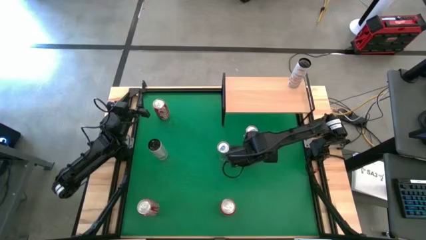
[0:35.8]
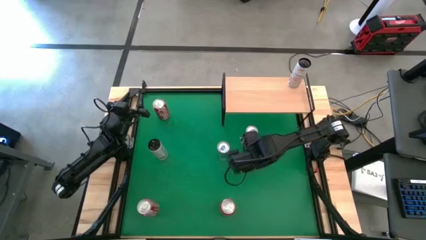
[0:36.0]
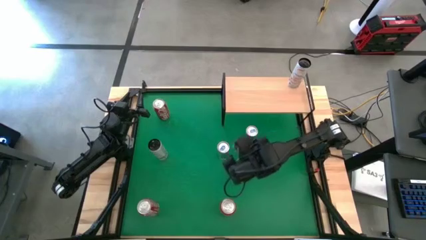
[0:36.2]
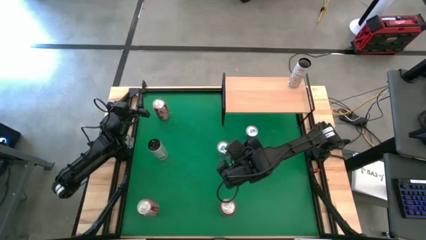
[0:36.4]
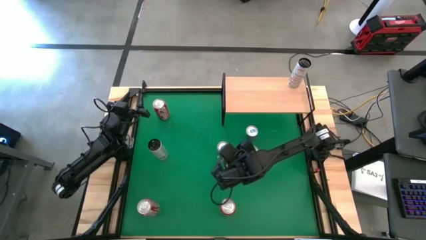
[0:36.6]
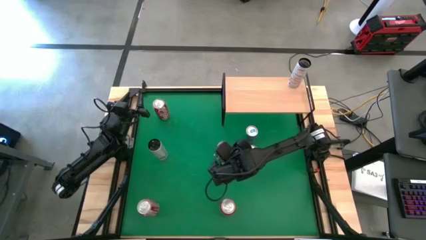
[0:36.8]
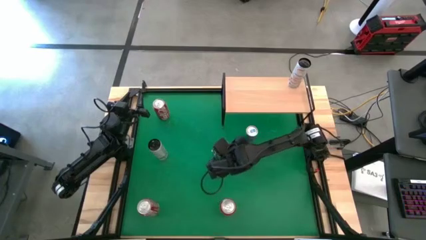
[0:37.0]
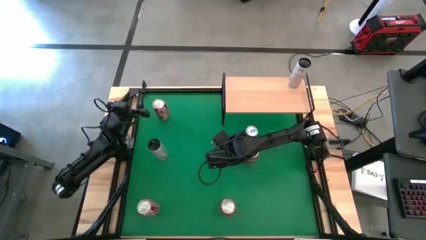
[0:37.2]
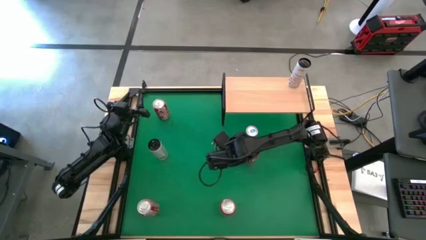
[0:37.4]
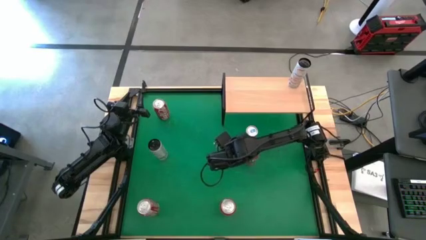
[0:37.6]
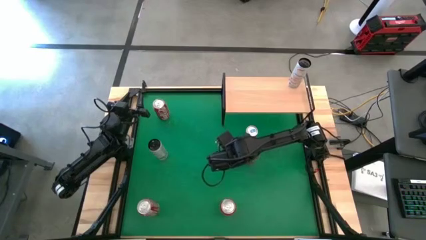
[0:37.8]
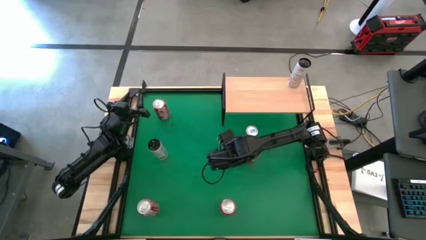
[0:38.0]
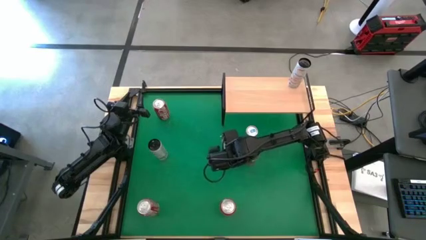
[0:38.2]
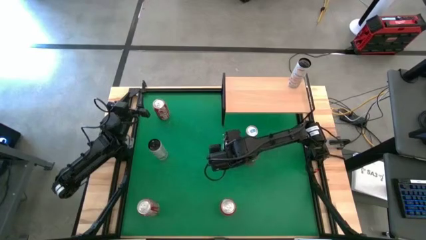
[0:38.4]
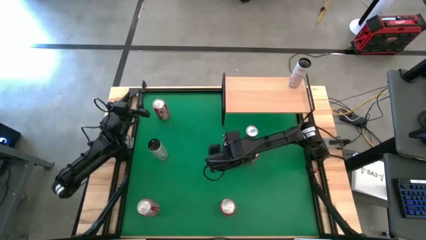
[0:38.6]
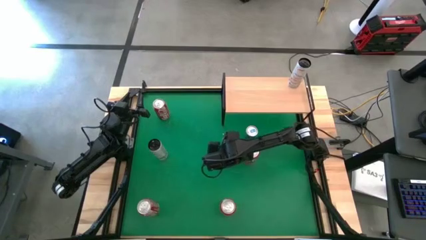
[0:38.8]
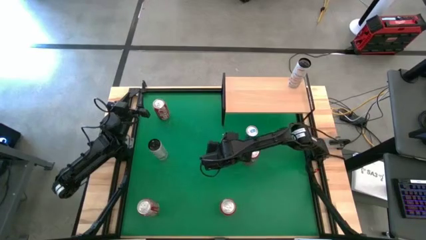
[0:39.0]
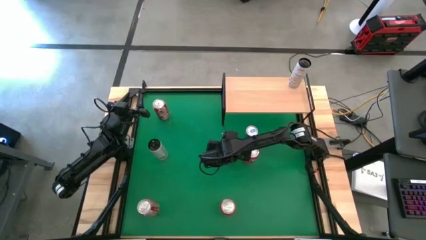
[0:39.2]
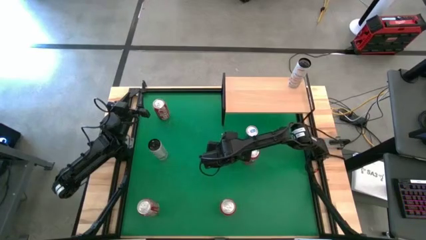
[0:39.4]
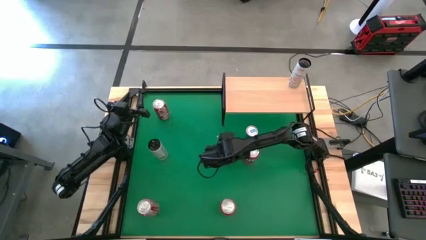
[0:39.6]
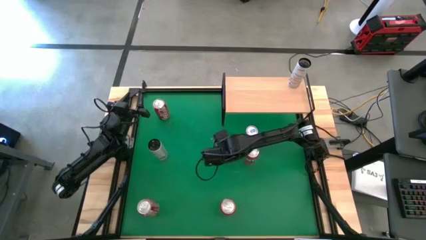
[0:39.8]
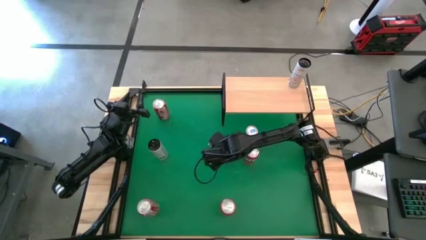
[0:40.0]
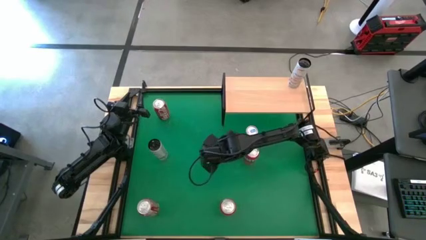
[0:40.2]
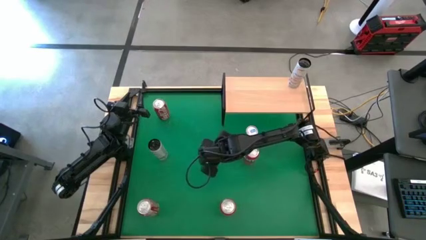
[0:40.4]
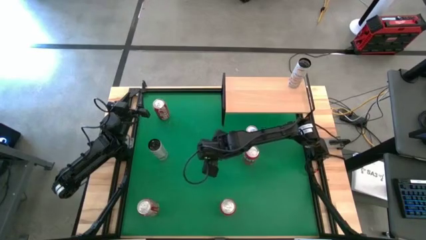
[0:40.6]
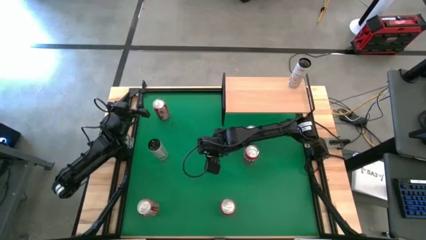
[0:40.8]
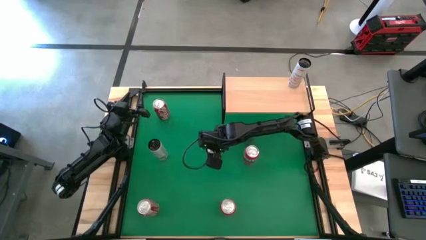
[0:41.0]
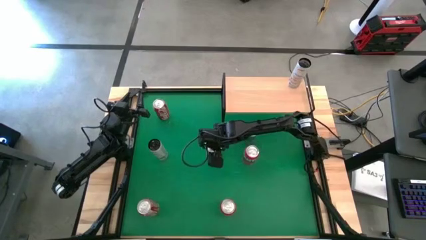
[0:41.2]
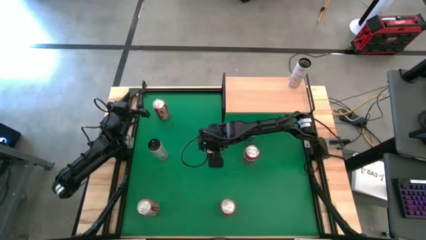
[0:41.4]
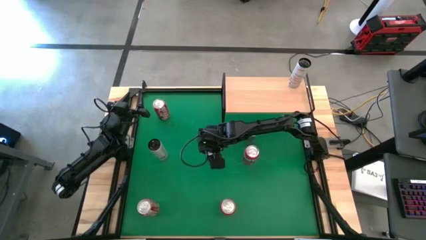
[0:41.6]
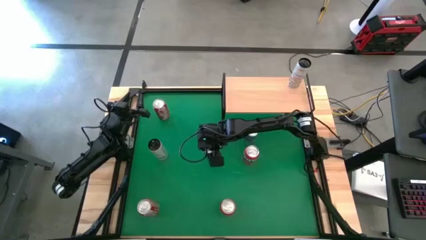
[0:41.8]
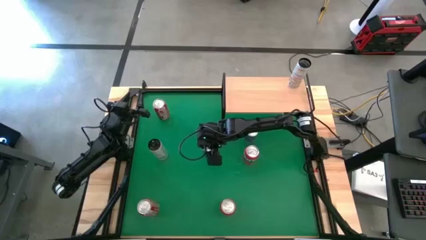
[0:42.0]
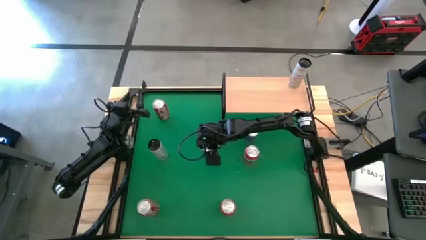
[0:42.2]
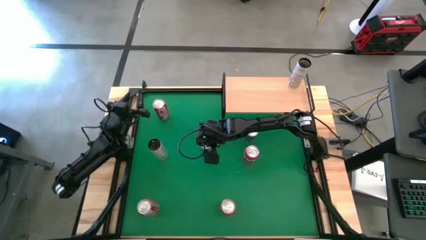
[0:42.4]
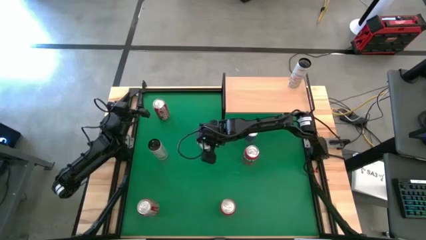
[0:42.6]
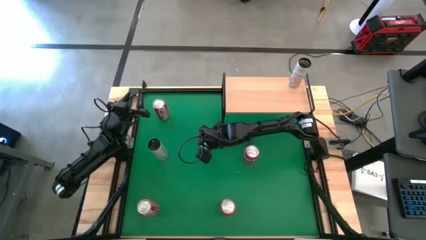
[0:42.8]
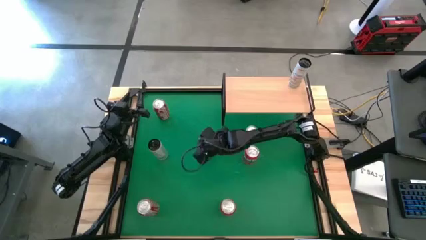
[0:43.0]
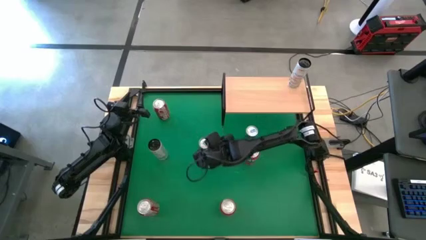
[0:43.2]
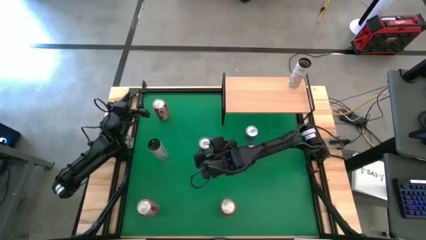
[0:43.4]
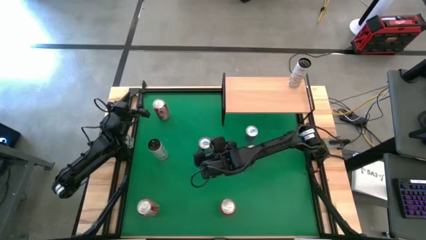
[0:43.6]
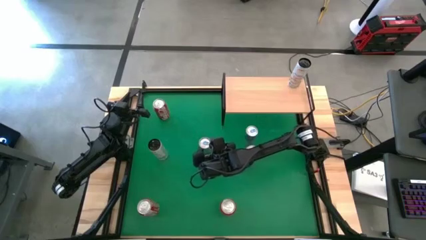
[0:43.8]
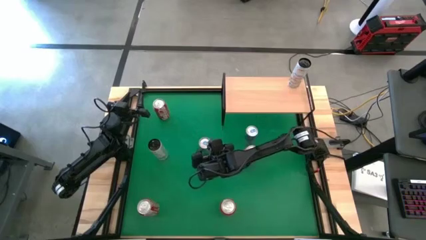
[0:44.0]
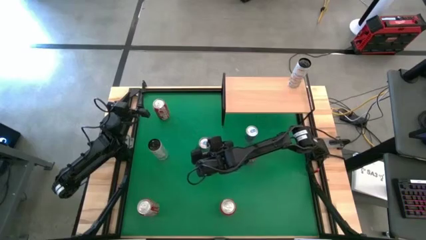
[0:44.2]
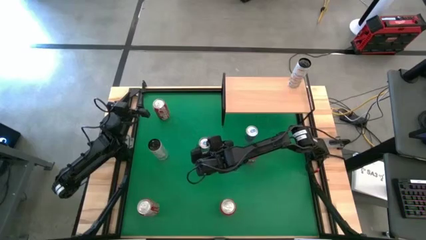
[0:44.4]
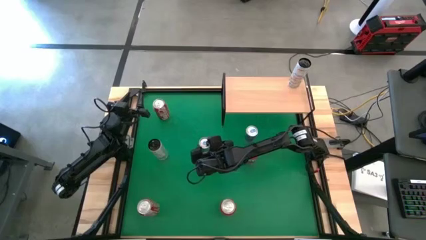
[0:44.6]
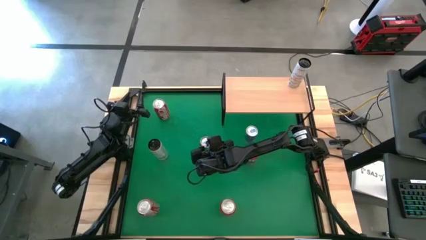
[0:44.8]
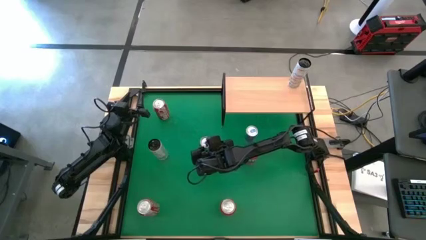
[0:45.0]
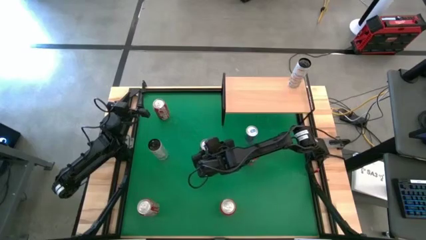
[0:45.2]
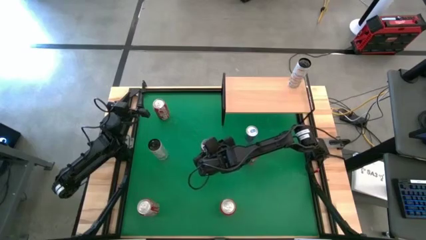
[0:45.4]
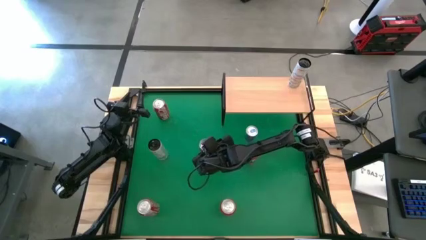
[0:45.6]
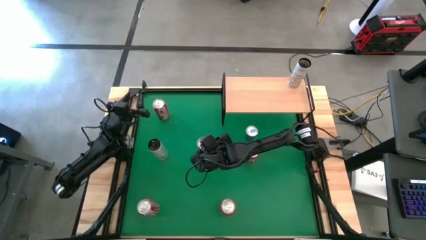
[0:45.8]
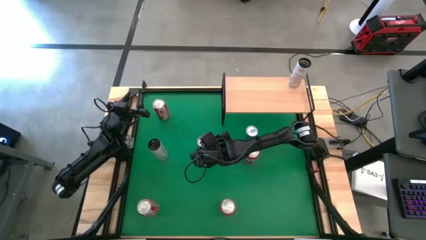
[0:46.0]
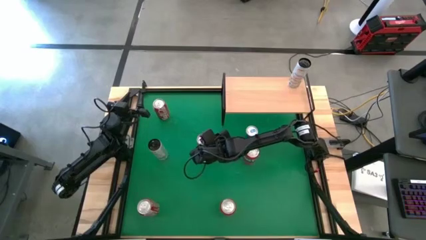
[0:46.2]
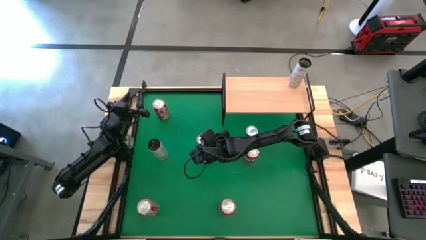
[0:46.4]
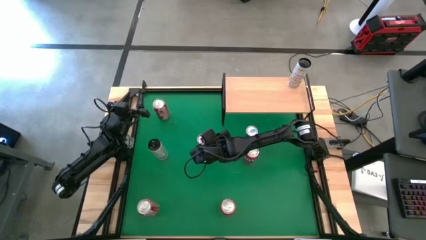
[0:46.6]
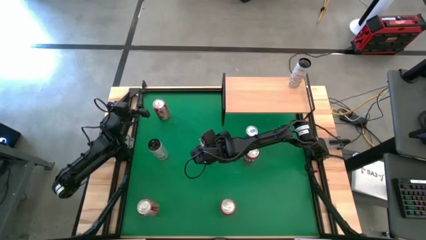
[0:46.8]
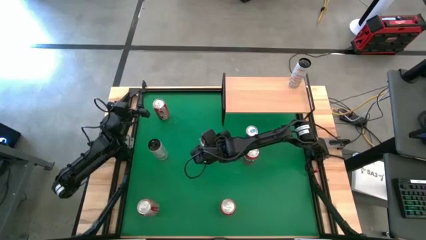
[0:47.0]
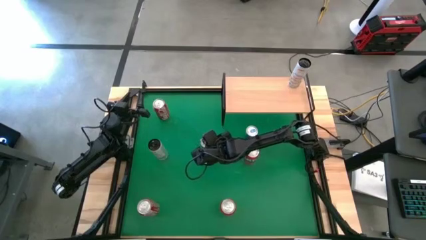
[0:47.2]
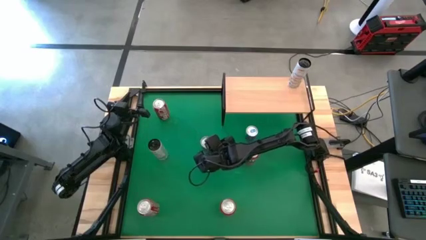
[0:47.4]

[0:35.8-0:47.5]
Task: Place canned beverage on shelf
Adjust the blue soda can
